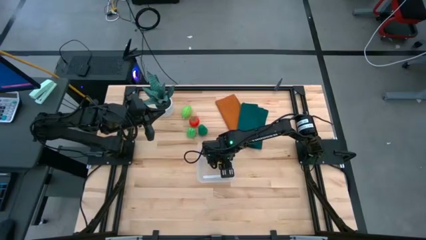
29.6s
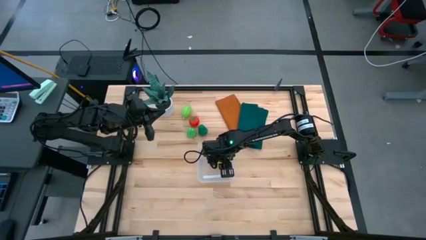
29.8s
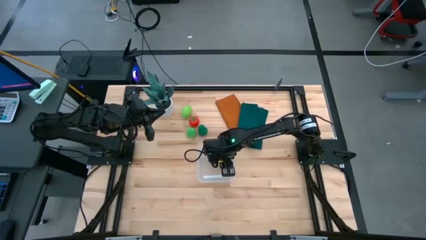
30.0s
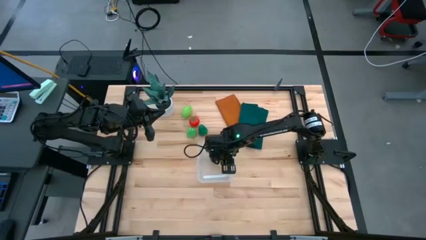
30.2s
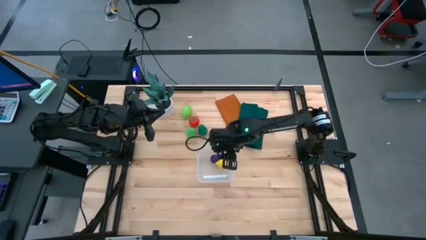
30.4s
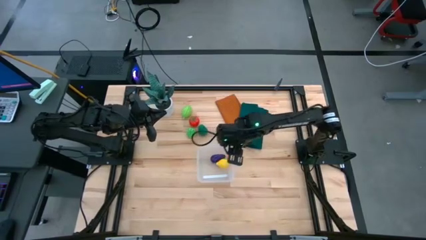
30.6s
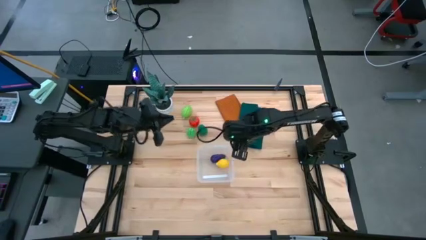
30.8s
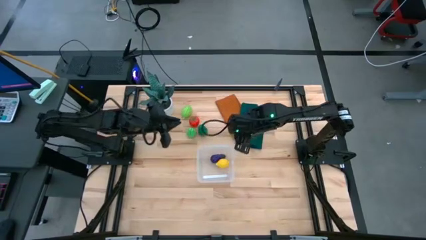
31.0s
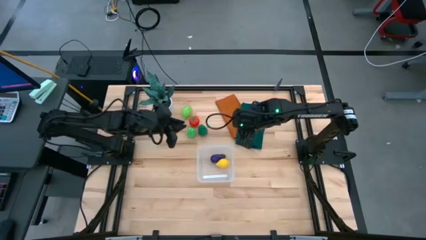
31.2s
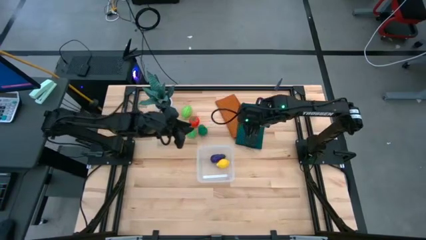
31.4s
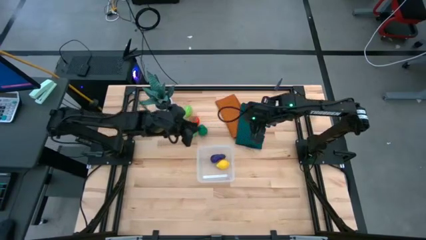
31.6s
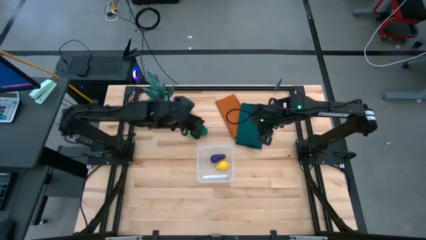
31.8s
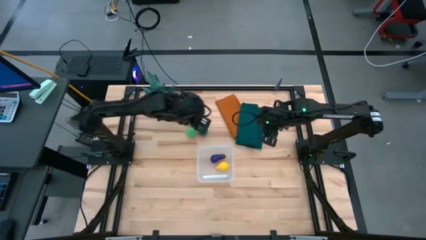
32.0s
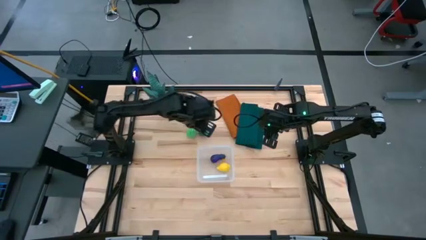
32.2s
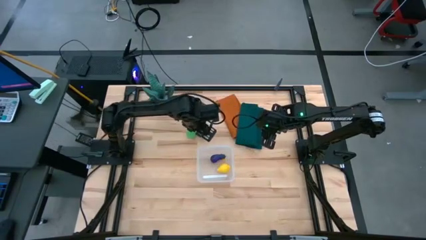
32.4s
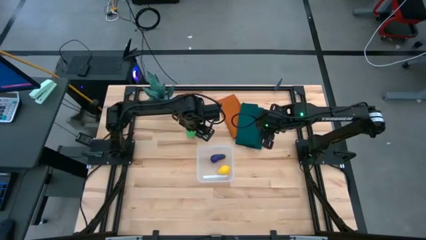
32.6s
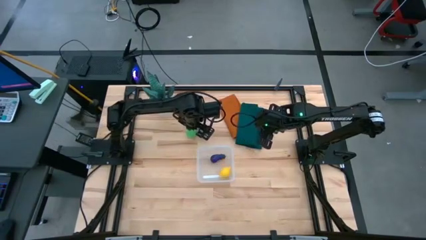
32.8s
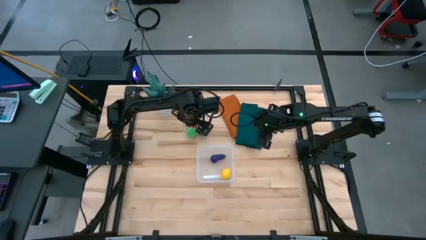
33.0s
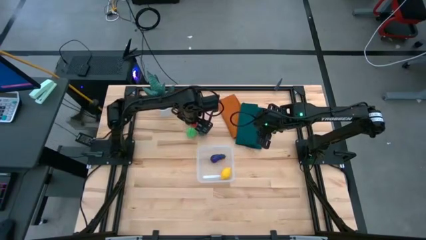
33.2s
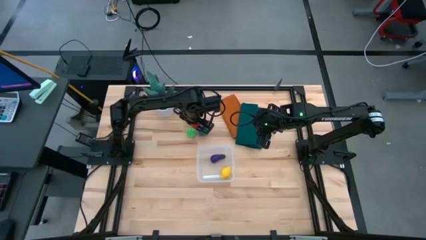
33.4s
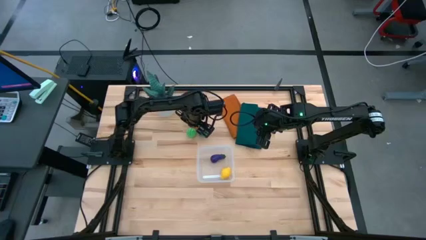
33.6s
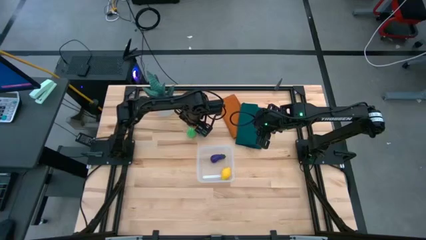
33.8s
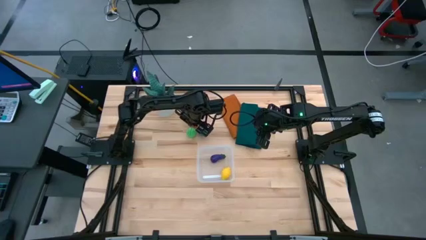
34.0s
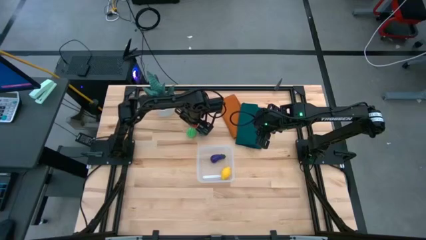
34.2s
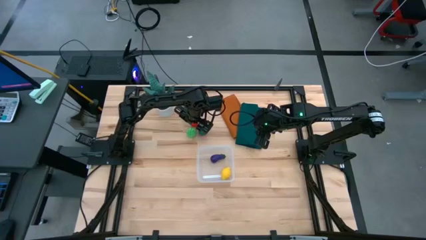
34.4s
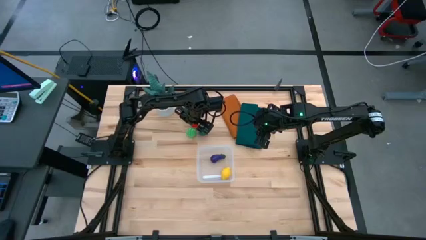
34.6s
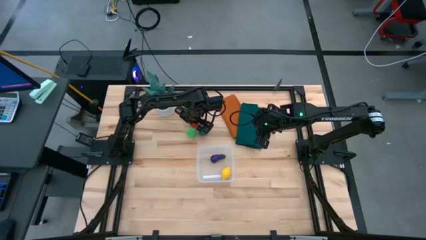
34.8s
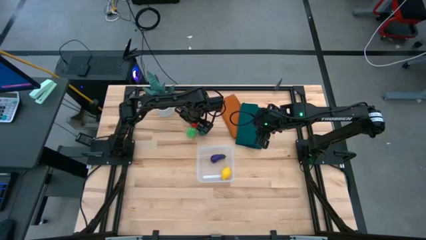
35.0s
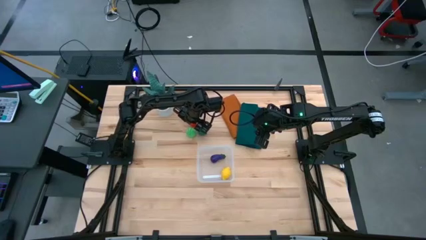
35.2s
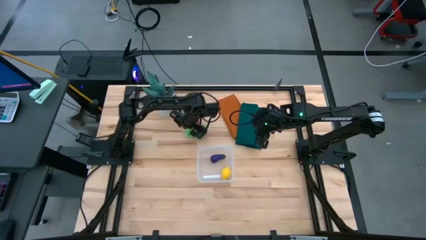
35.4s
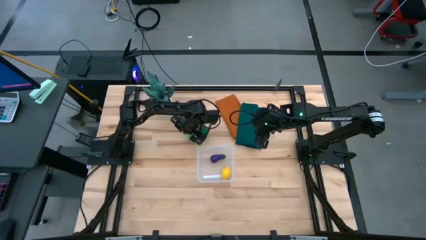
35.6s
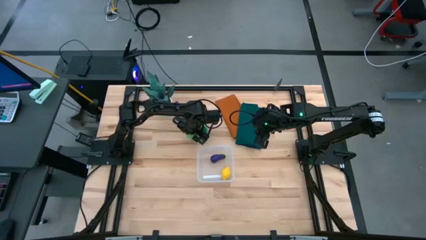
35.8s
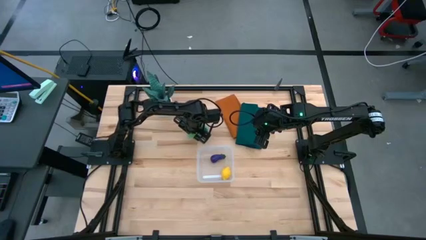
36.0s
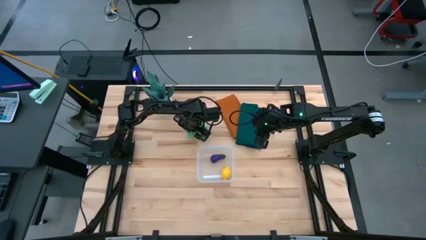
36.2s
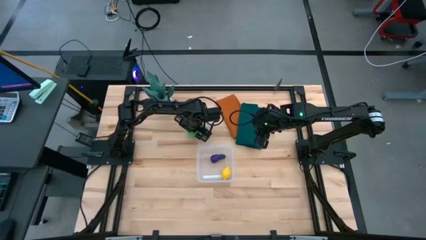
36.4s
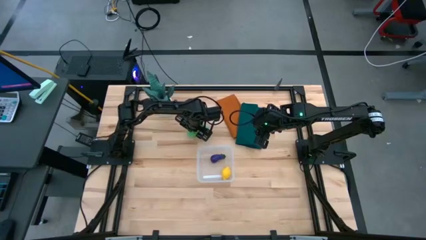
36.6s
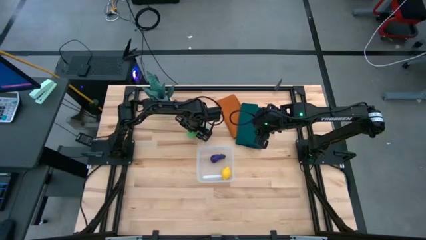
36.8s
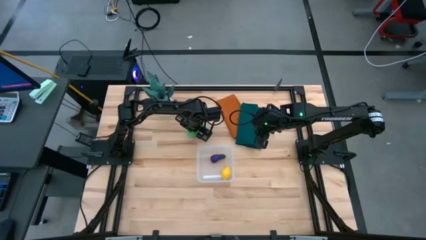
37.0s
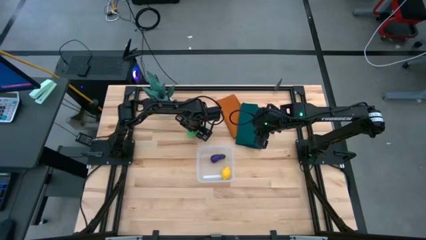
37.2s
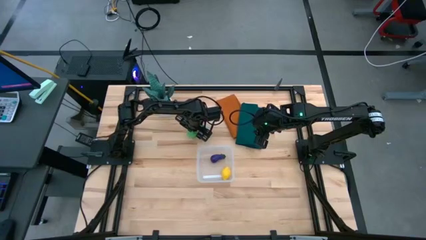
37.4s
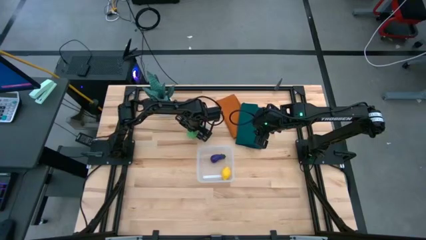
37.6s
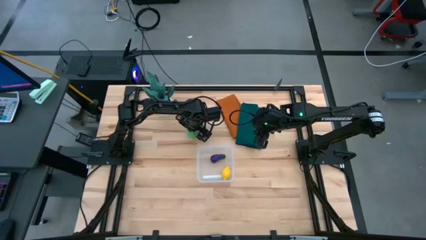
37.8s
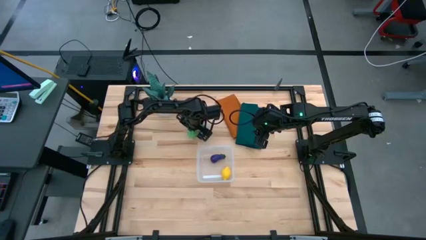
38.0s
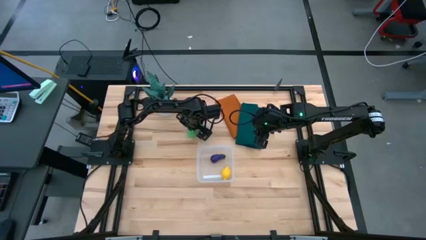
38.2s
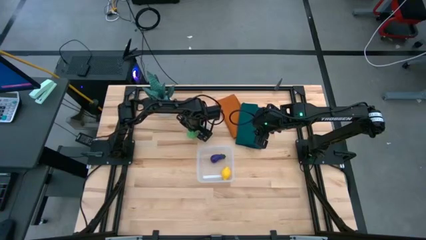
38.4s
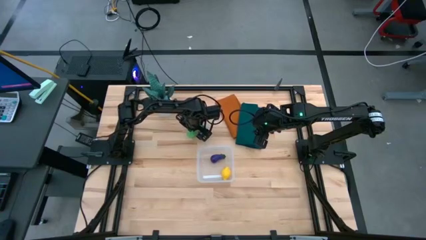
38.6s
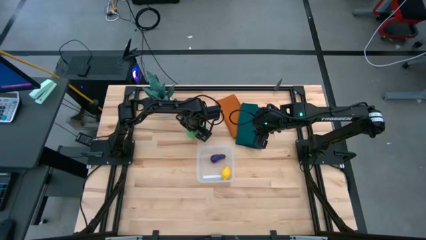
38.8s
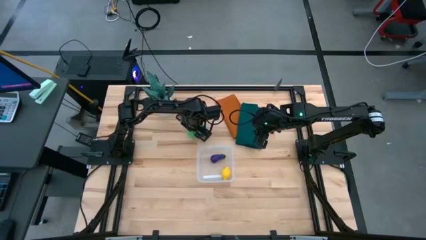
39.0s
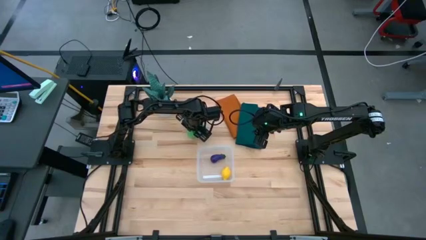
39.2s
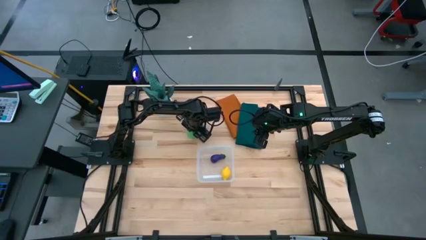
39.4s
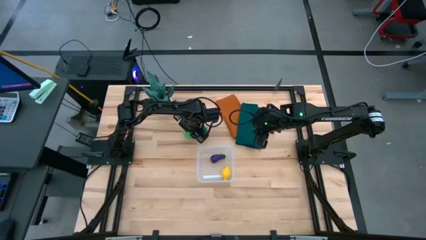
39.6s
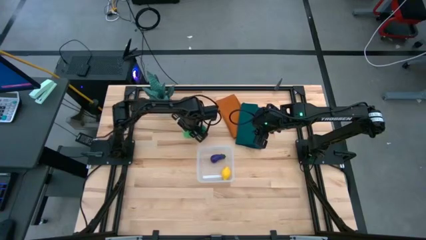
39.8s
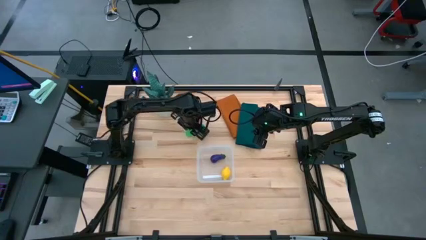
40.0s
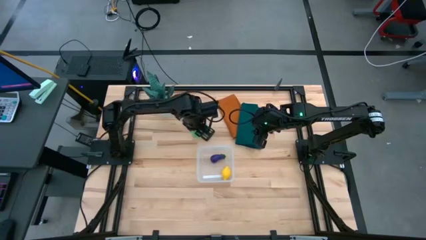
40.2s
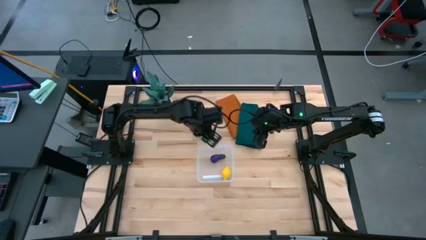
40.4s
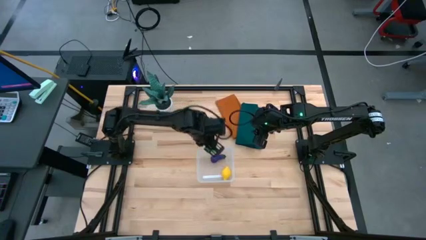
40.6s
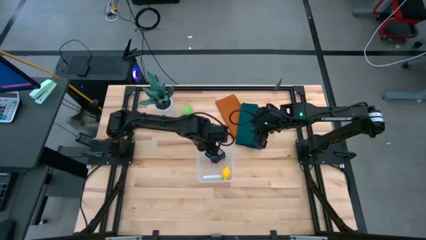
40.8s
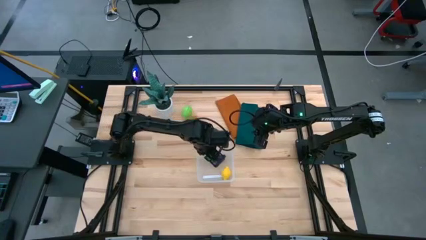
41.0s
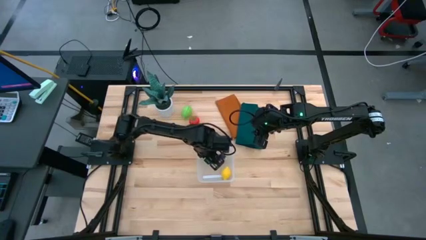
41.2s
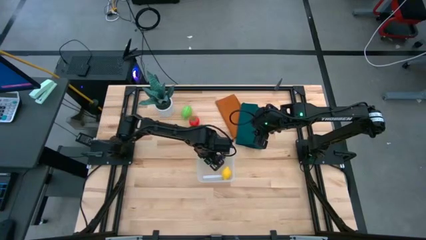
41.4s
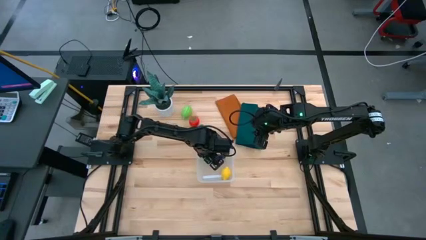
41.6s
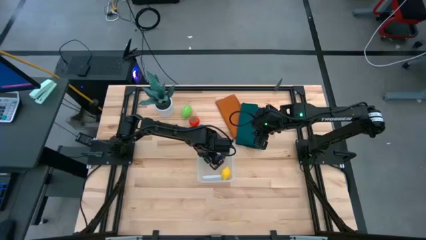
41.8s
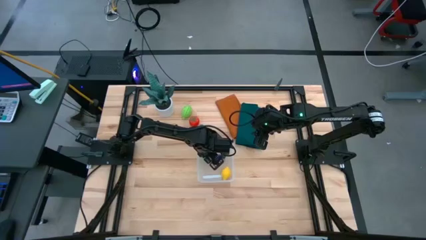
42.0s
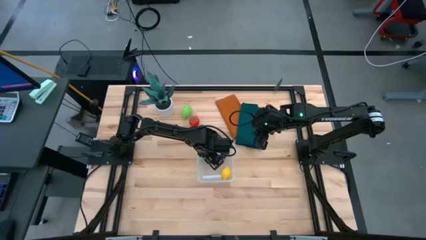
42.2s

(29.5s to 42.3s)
Task: Pick and placing Produce into tupperware
Put the green pear into the transparent container

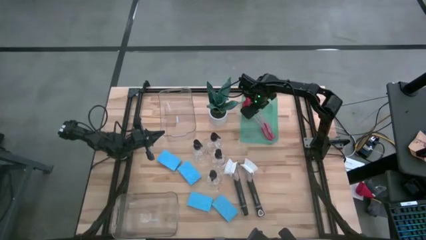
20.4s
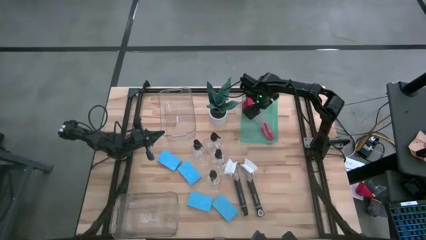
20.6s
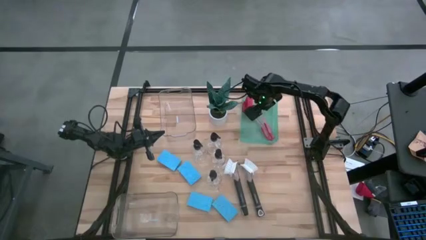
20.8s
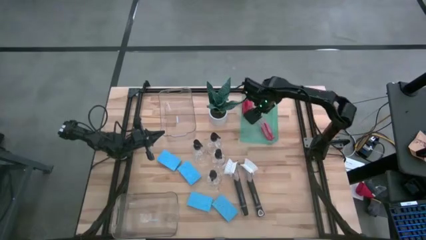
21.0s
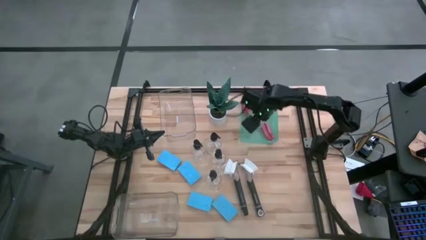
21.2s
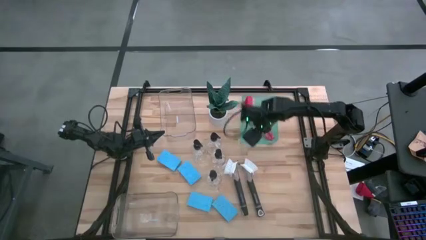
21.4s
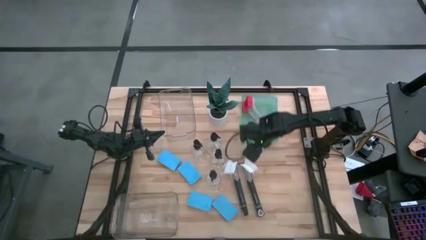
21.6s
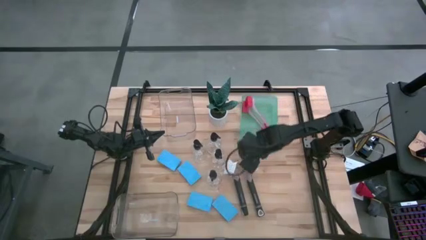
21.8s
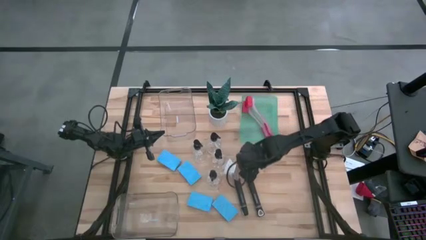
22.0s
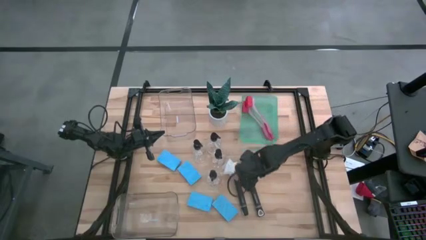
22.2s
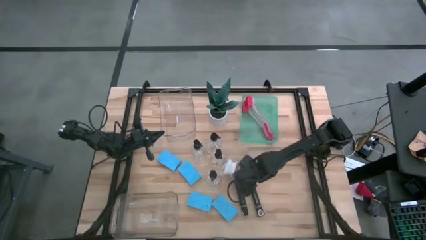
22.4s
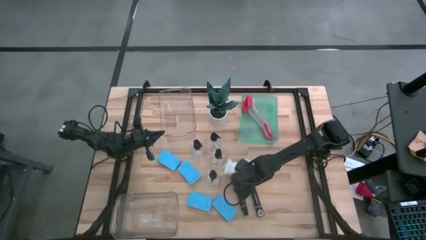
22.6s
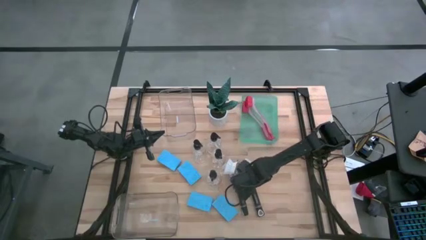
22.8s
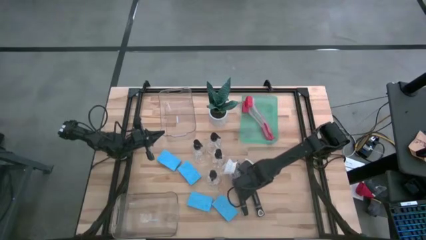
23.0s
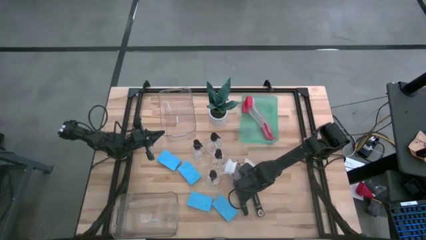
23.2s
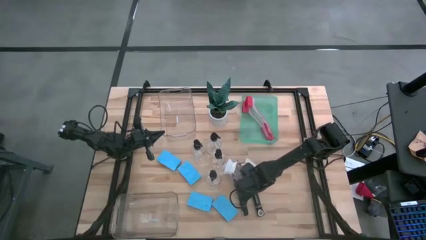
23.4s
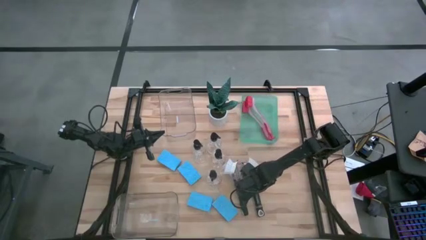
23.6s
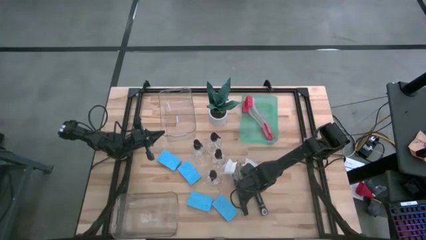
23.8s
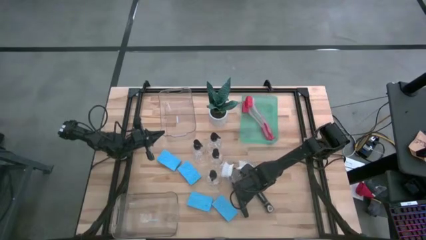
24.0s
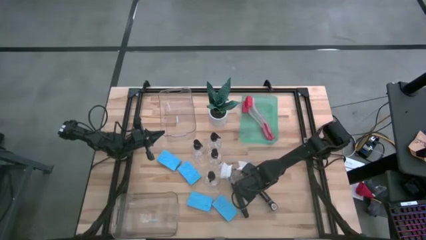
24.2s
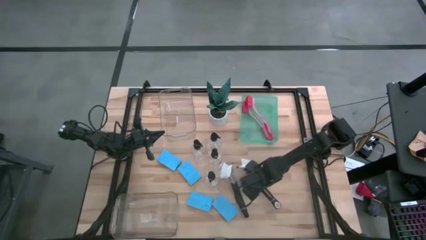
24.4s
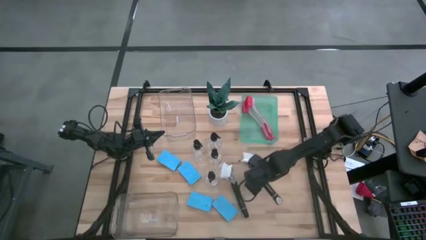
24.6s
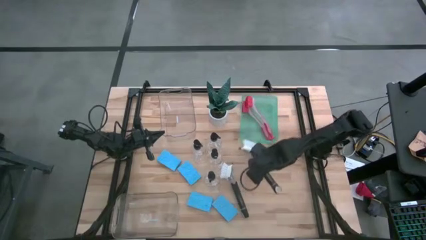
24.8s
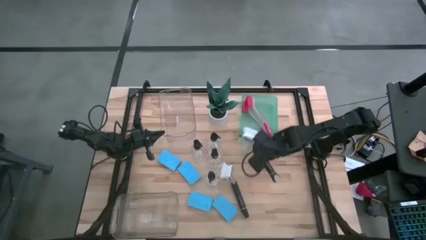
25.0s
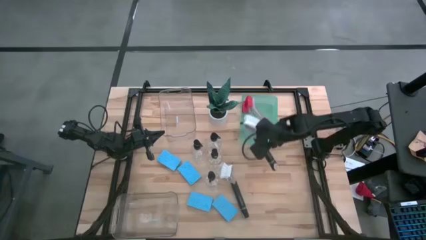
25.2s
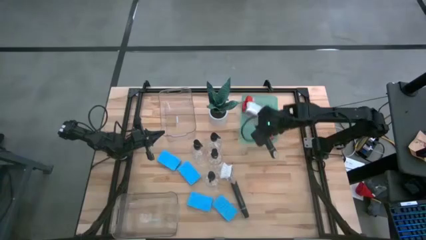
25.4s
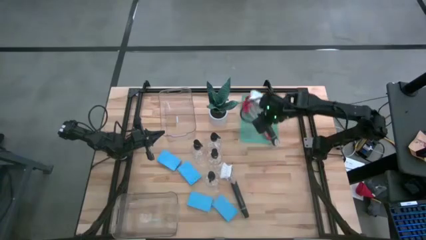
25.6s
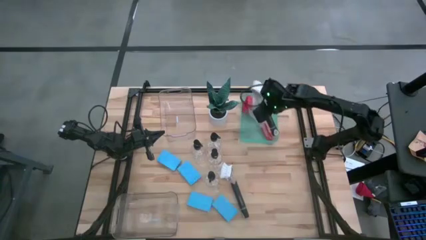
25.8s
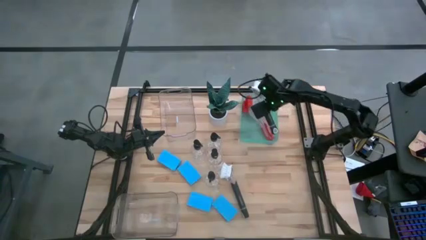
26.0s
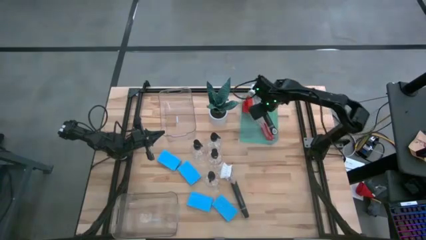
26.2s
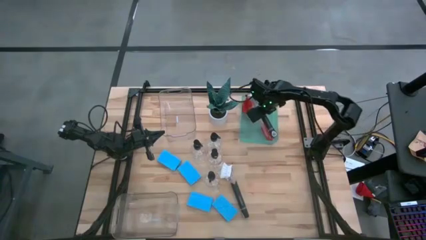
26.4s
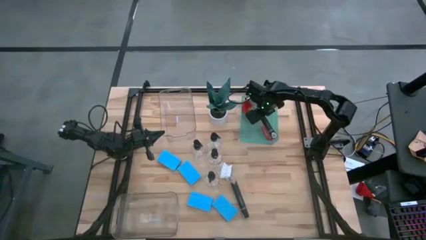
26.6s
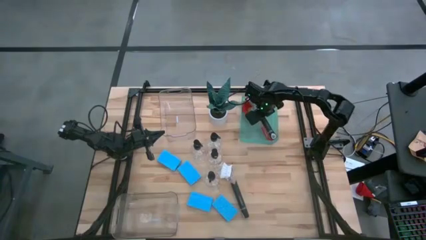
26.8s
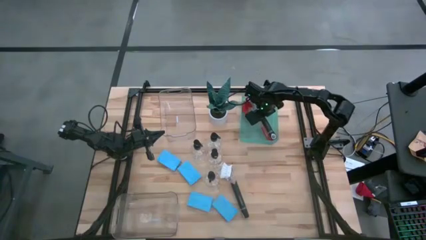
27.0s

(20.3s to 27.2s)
Task: Pick & Place Kitchen Sink Supplies
Put the black dish brush into the green bin
